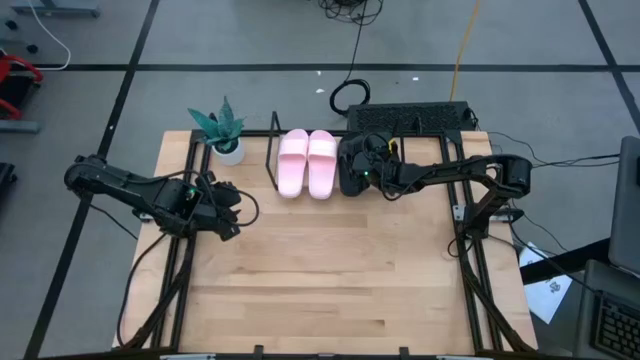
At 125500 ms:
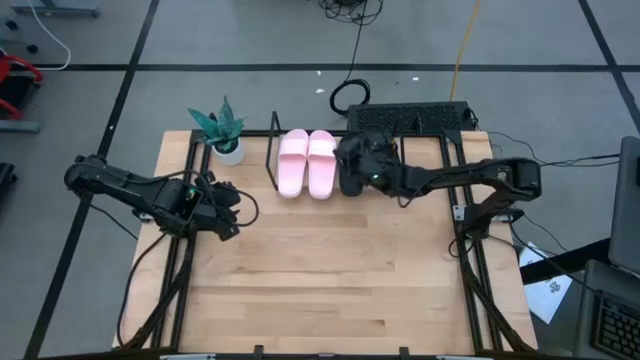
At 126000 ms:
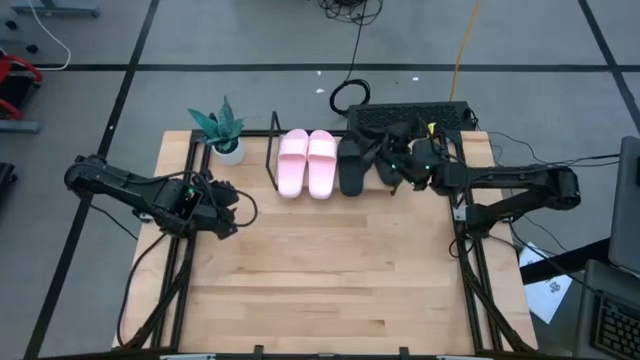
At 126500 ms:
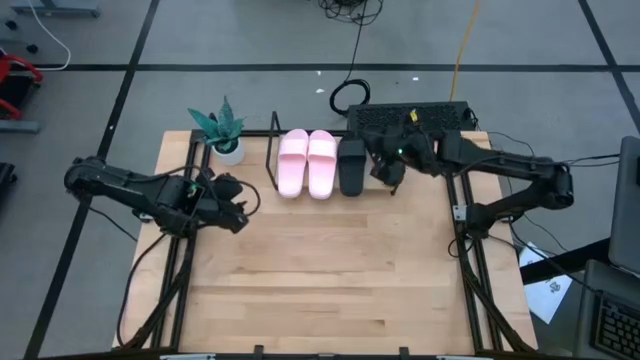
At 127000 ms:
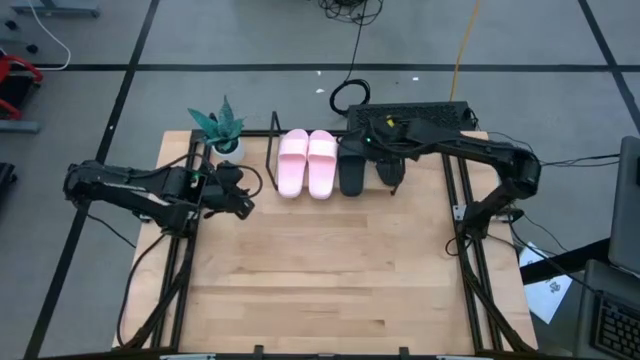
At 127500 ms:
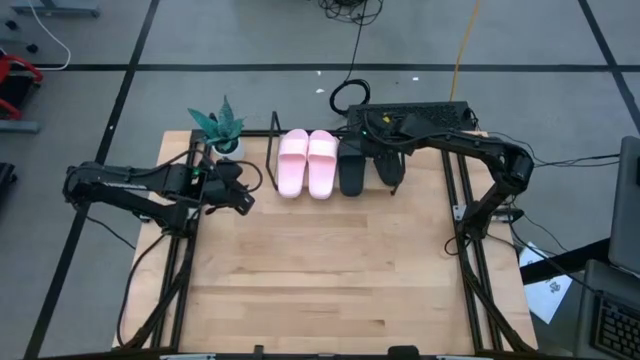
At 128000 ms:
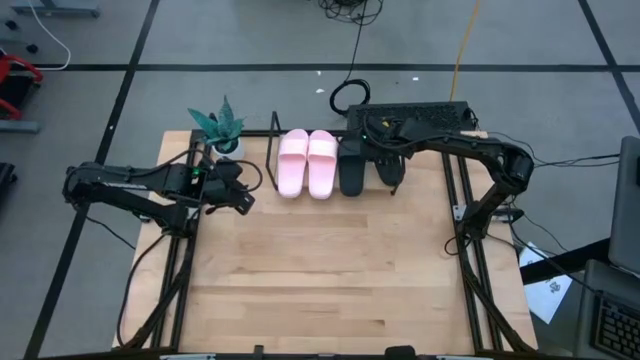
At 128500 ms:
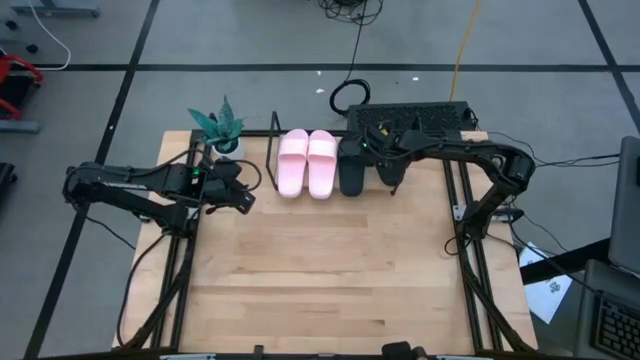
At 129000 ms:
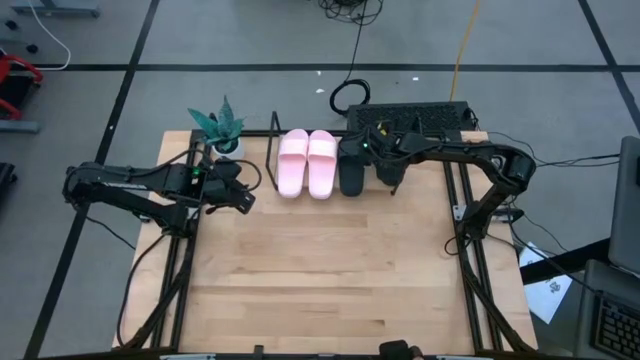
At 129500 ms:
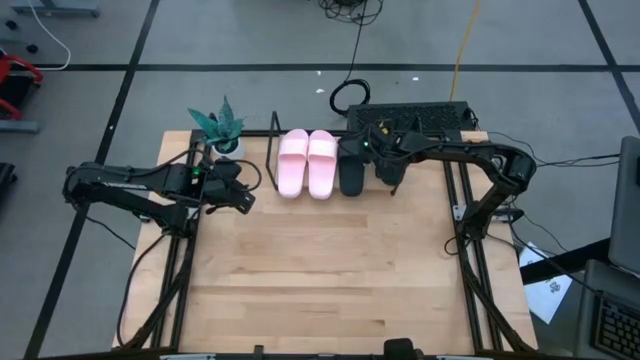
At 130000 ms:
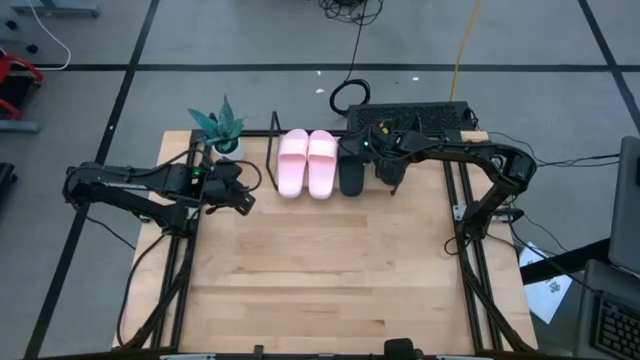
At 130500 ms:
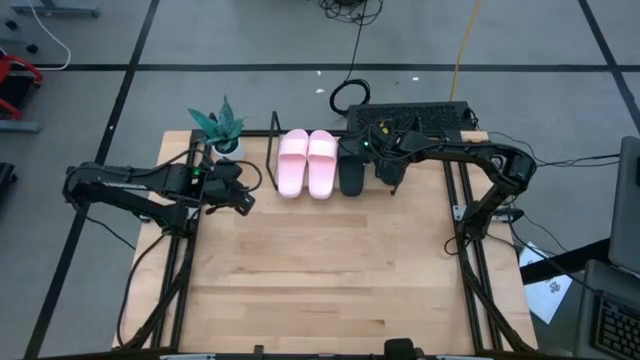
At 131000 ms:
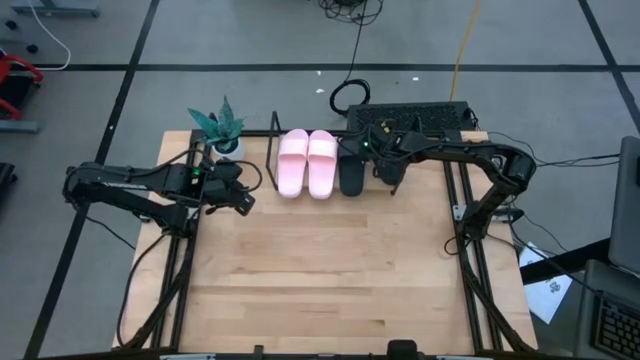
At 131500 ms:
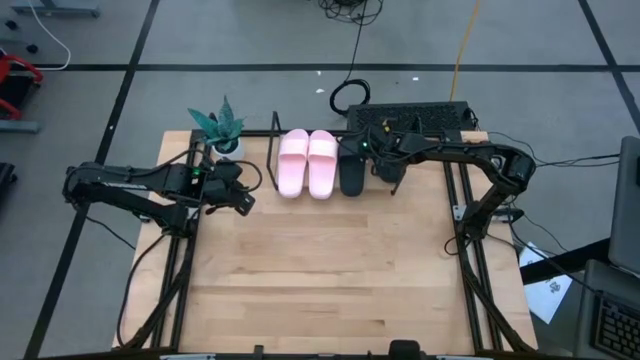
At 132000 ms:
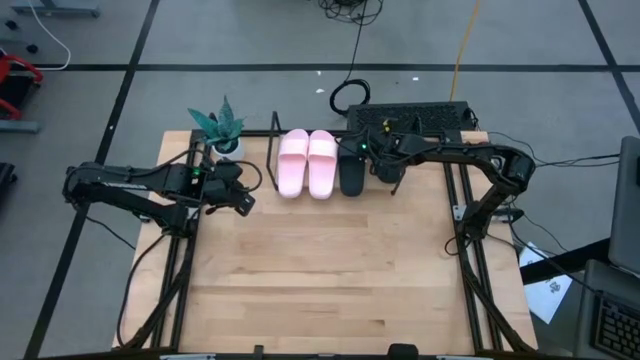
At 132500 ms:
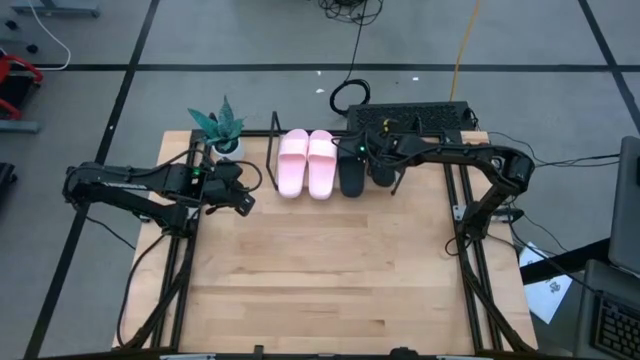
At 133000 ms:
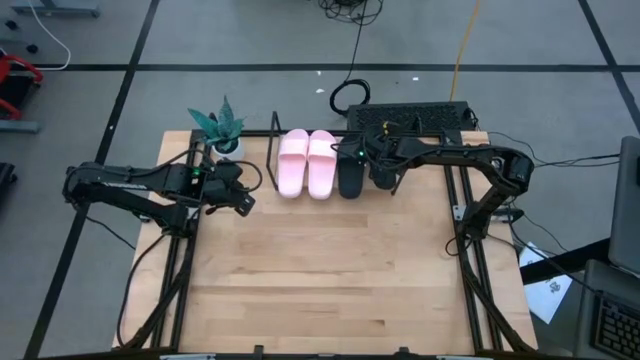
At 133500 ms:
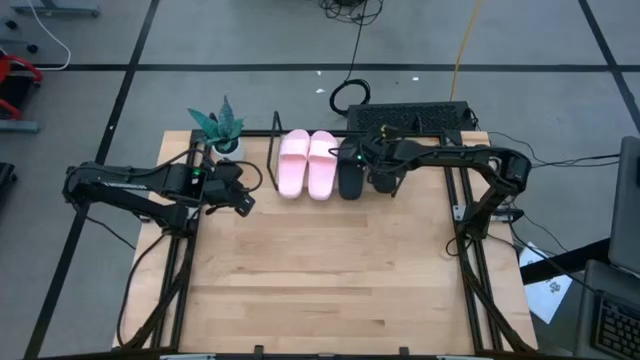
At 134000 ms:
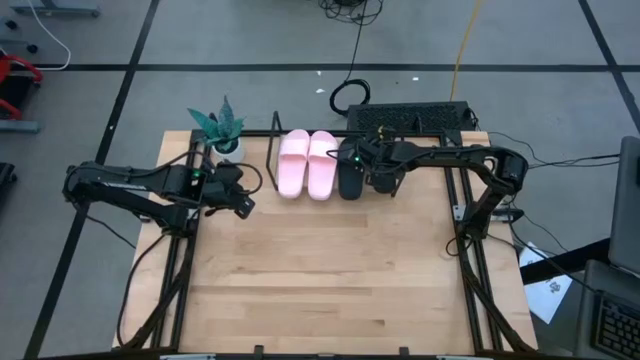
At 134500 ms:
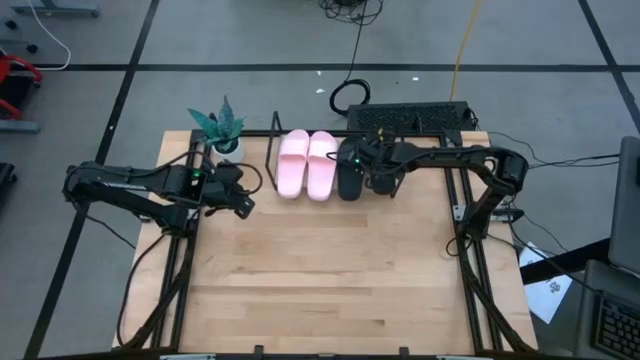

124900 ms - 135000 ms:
Task: Pick and place slides into the shelf
Adjust the right black slide on the shelf

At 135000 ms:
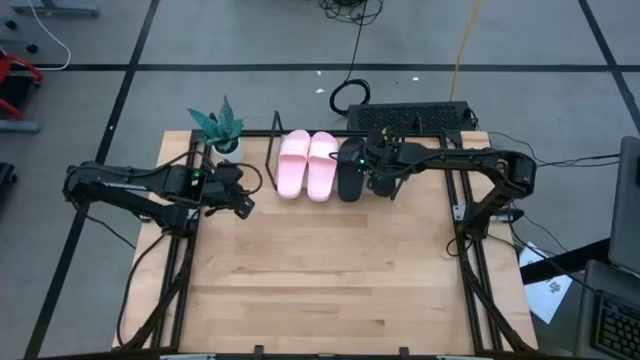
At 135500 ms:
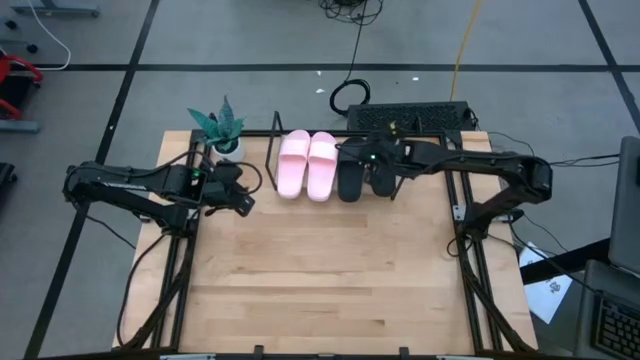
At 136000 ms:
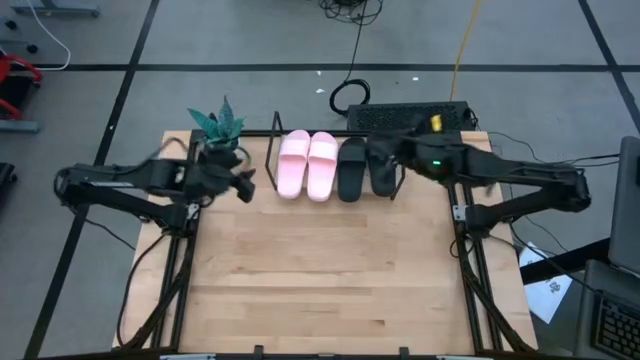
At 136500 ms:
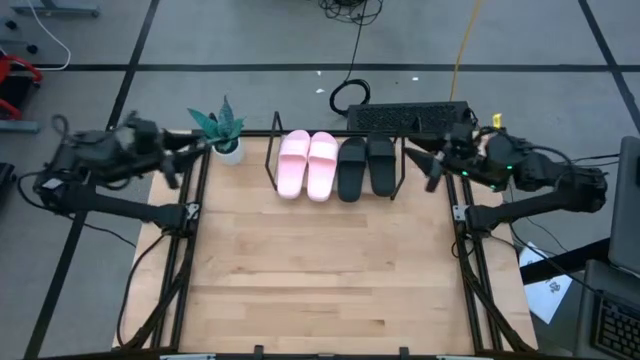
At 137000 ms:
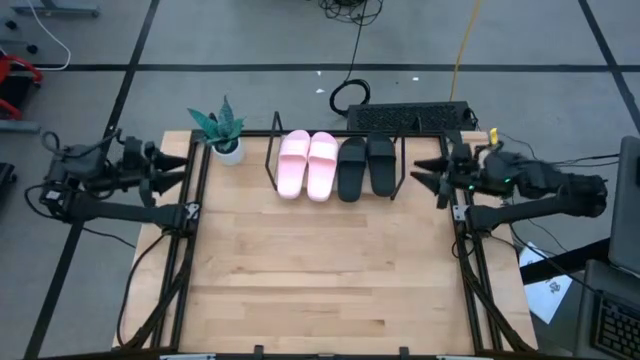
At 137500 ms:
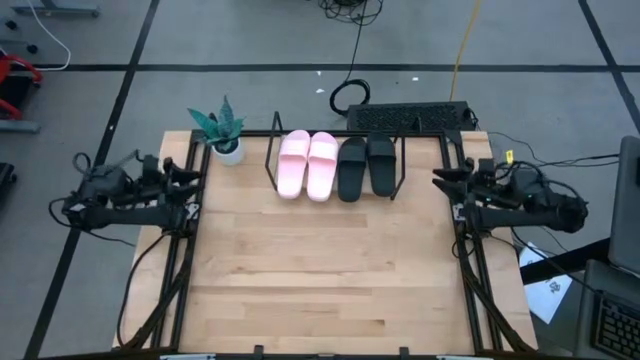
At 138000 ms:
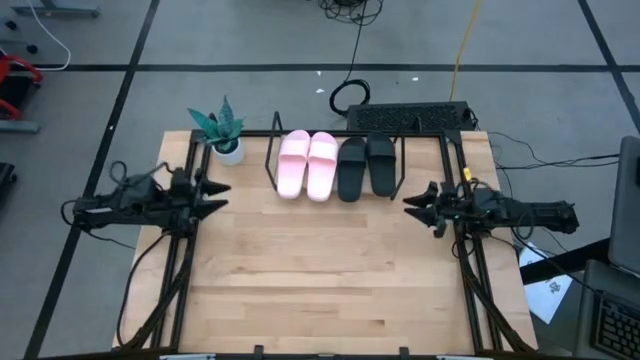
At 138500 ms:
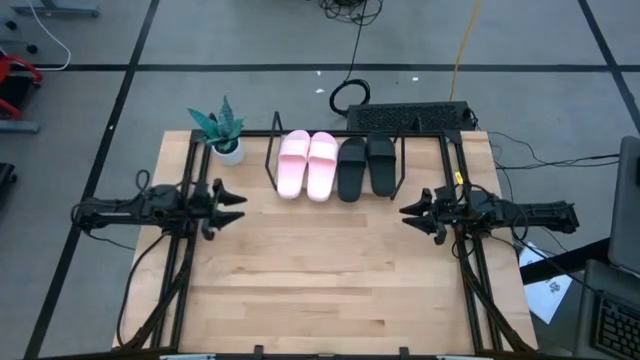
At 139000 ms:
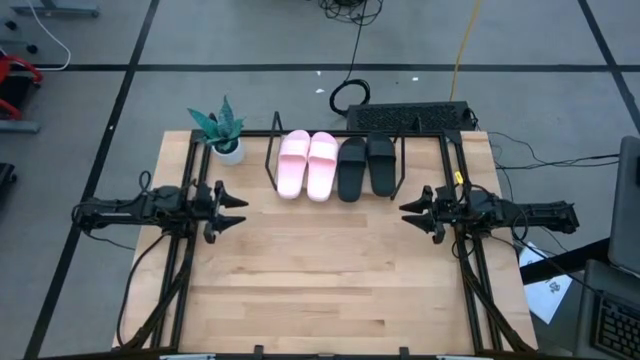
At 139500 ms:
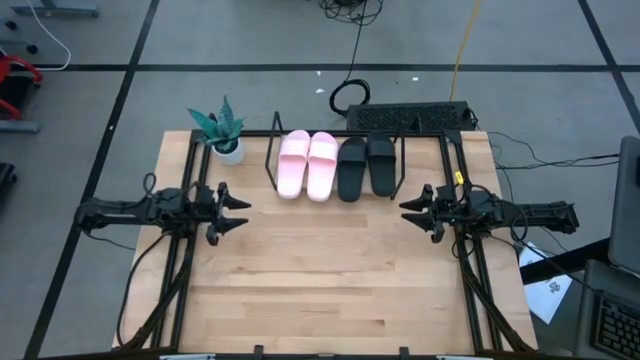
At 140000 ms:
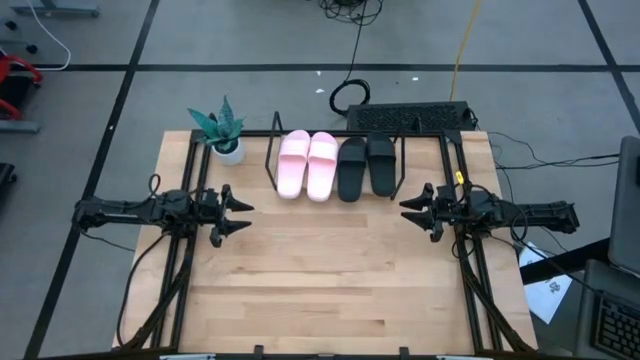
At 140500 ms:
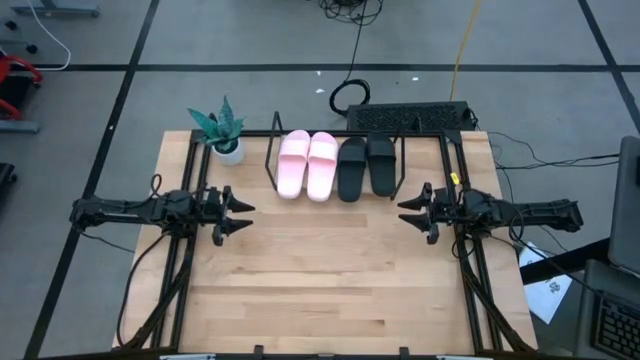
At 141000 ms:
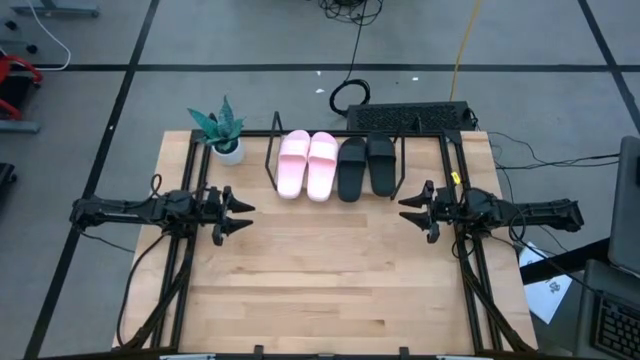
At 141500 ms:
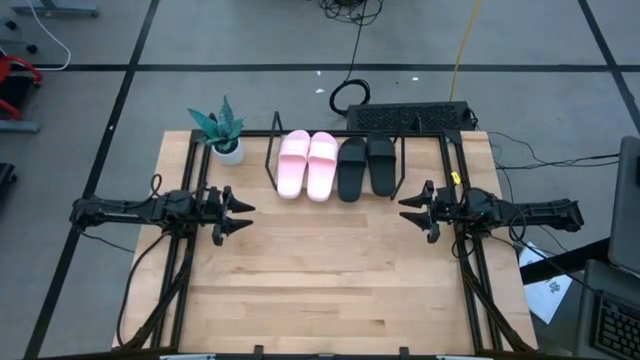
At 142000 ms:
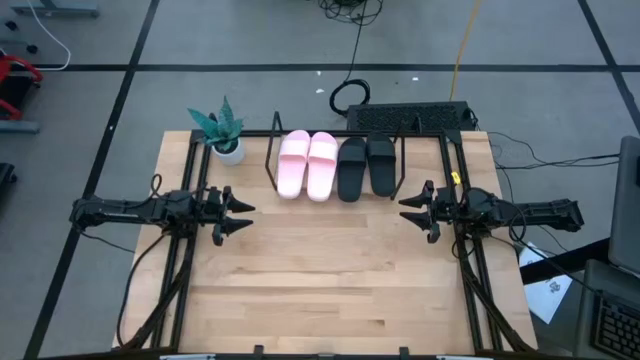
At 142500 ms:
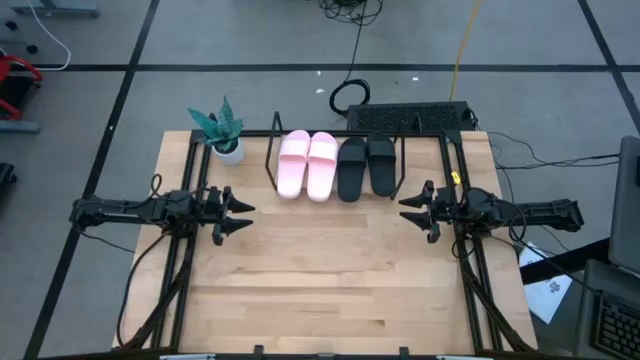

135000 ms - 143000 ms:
Return to Home Position

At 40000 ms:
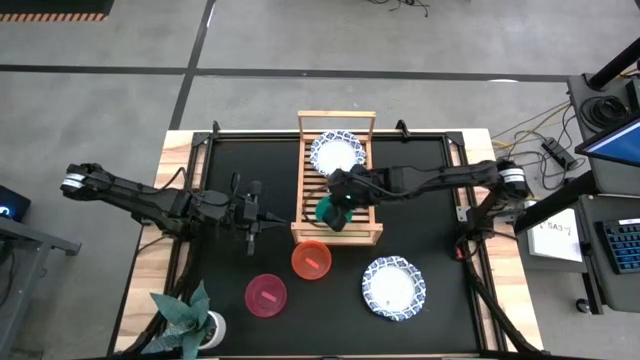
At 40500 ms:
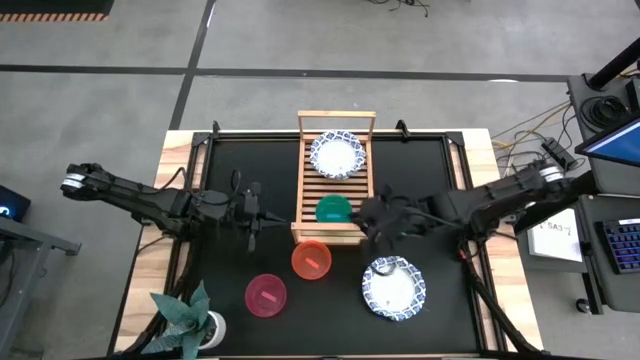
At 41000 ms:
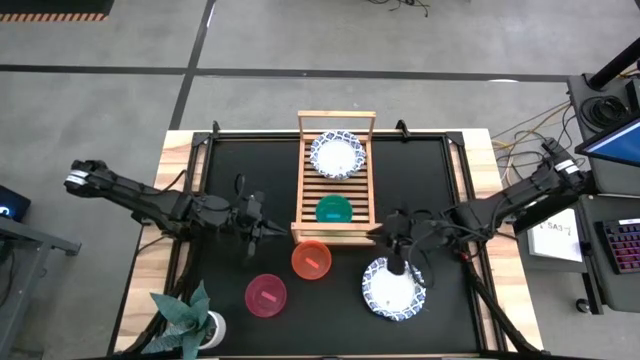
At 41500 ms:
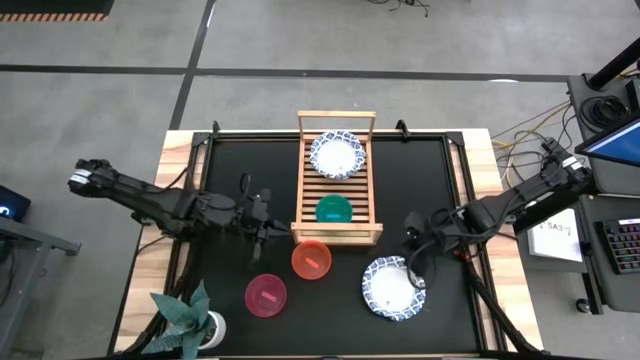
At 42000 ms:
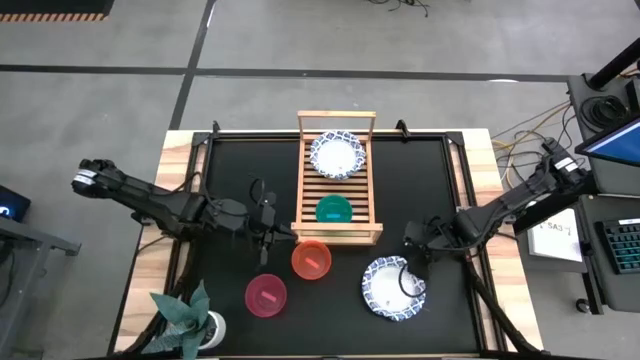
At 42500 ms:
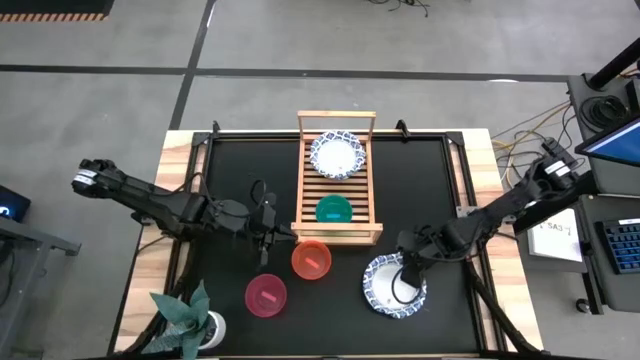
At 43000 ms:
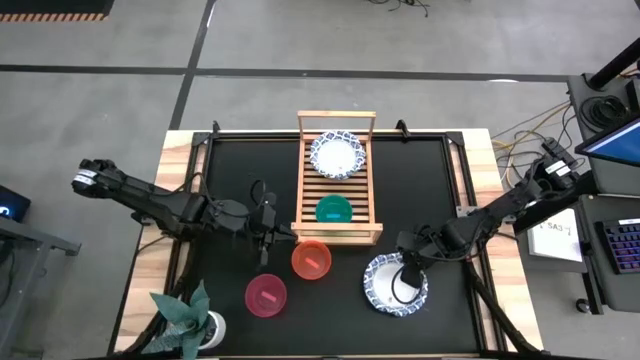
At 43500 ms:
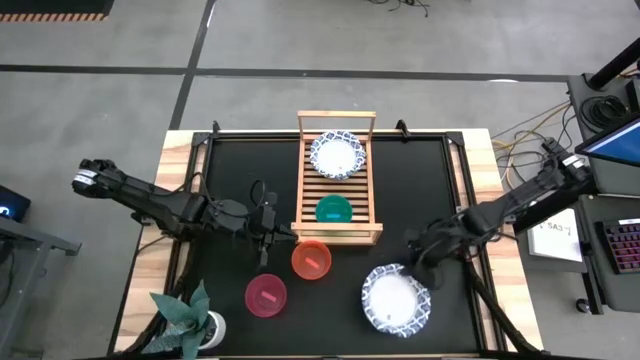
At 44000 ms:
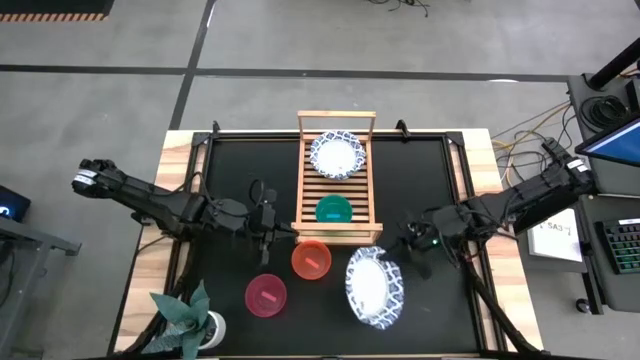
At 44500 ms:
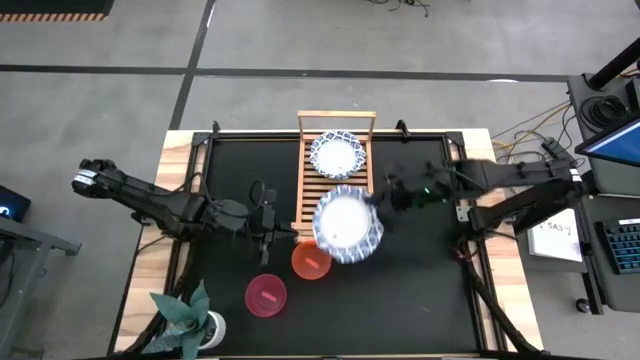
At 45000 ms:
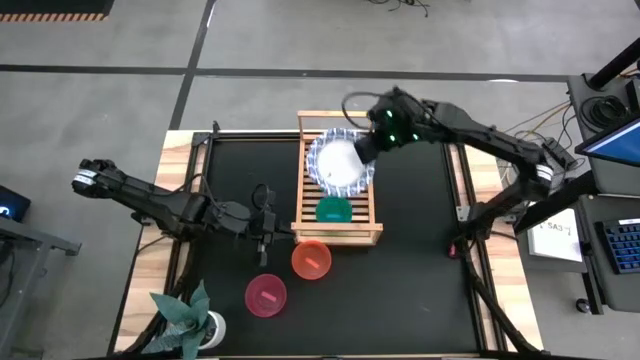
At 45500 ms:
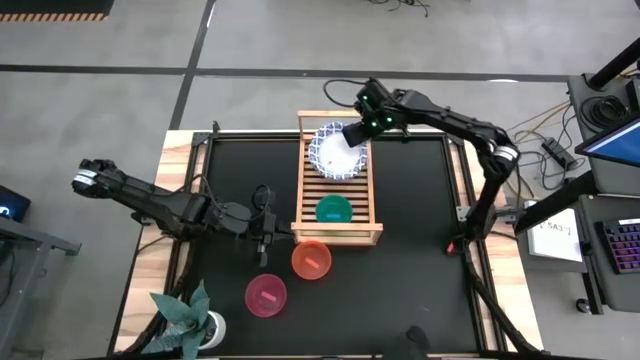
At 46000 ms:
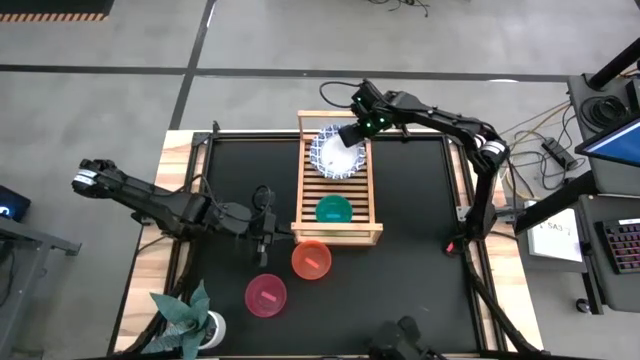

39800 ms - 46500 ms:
Task: Place and stack bowls onto a shelf
Stack the white bowl on top of the white bowl on the shelf
